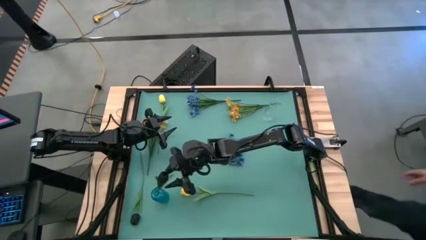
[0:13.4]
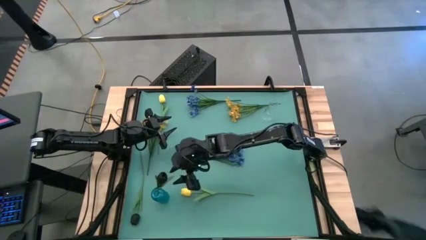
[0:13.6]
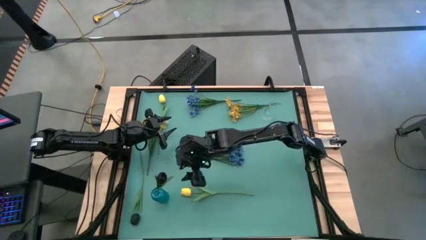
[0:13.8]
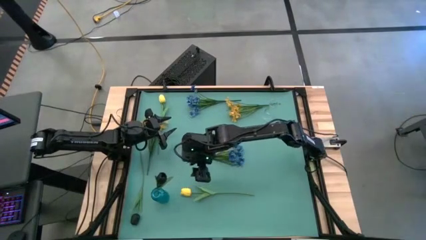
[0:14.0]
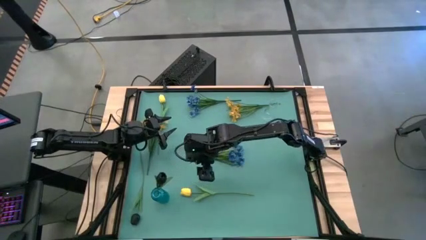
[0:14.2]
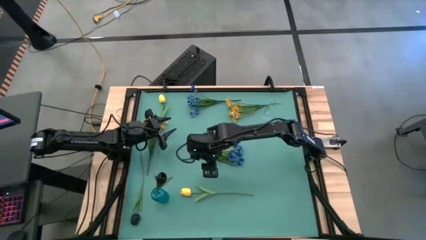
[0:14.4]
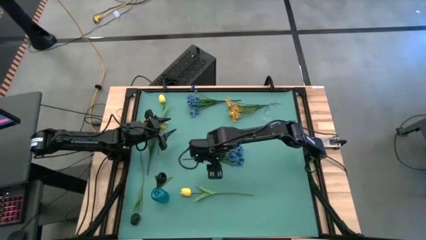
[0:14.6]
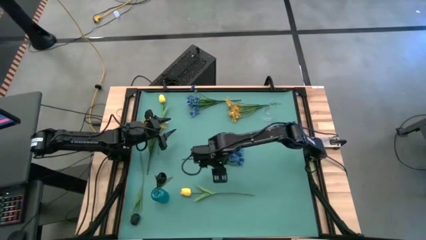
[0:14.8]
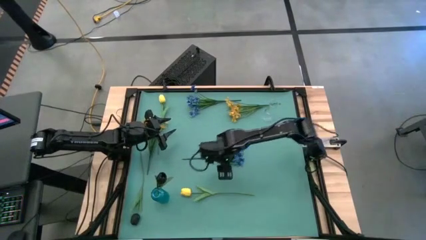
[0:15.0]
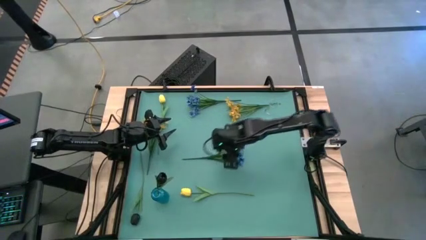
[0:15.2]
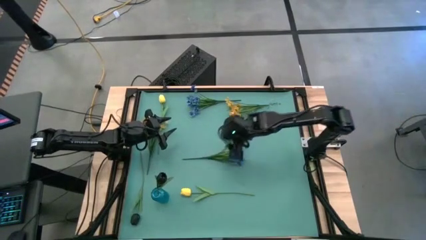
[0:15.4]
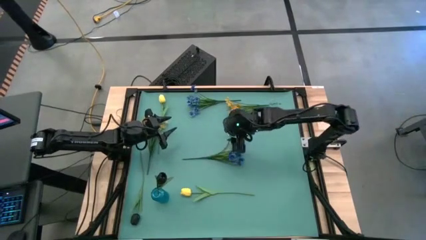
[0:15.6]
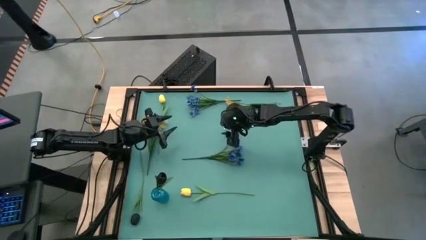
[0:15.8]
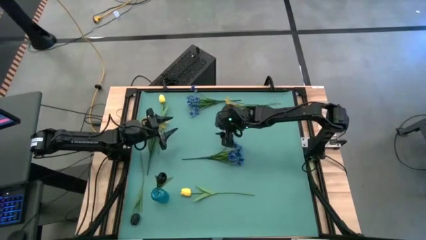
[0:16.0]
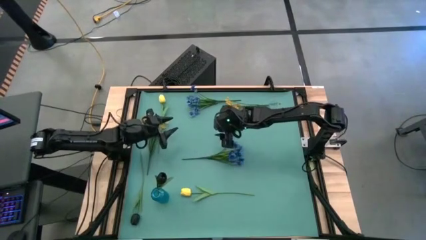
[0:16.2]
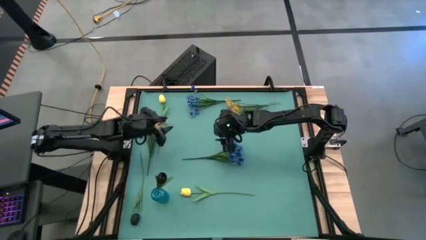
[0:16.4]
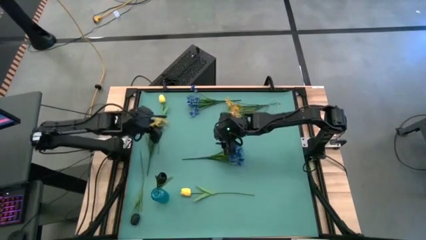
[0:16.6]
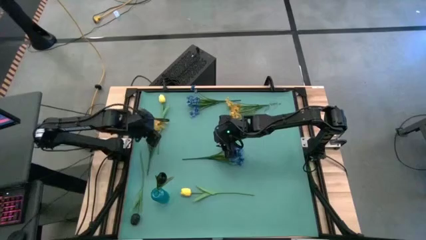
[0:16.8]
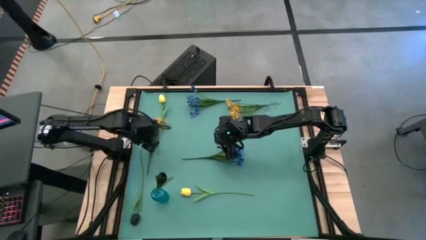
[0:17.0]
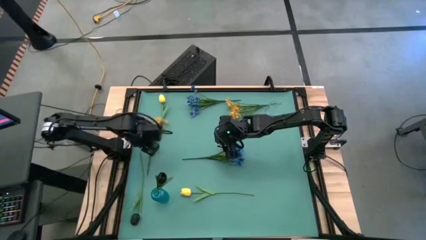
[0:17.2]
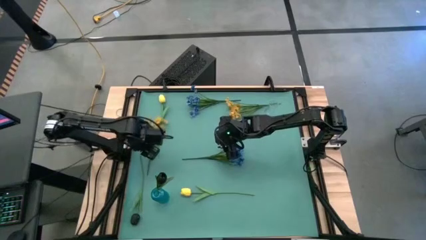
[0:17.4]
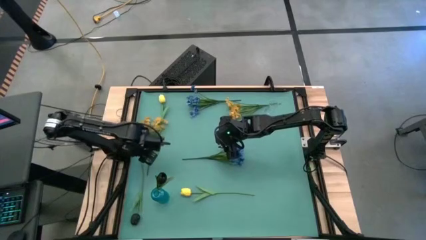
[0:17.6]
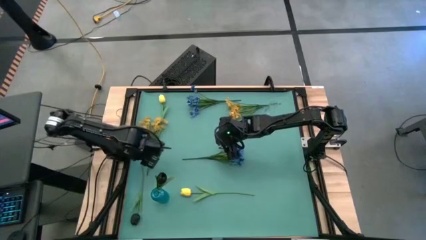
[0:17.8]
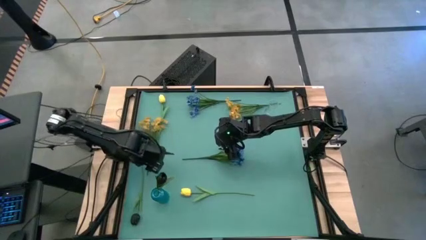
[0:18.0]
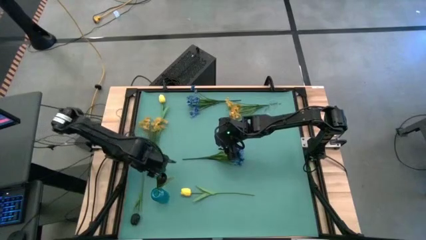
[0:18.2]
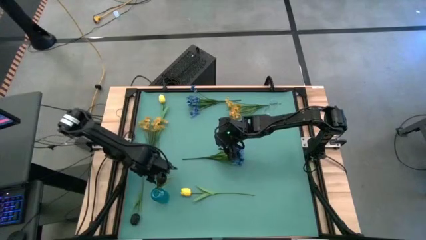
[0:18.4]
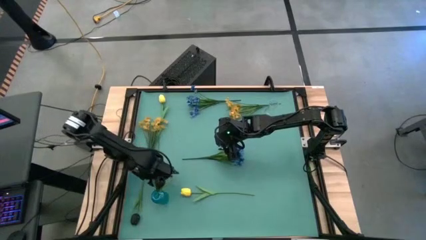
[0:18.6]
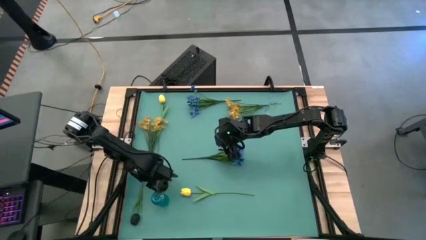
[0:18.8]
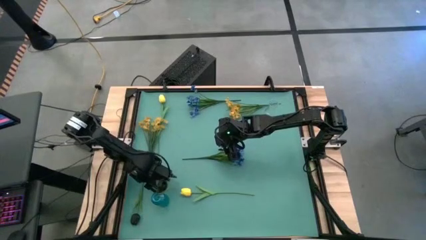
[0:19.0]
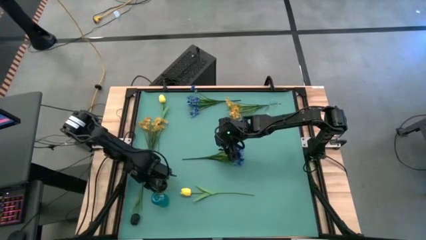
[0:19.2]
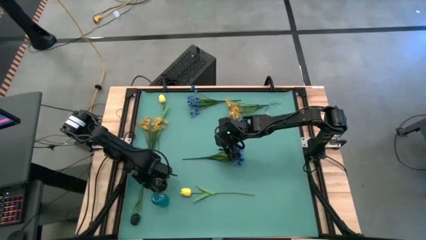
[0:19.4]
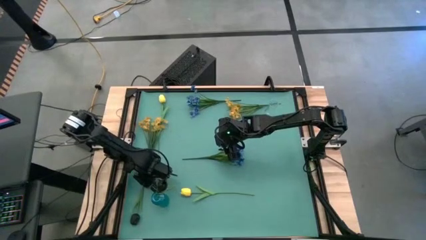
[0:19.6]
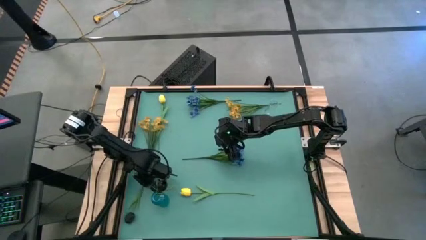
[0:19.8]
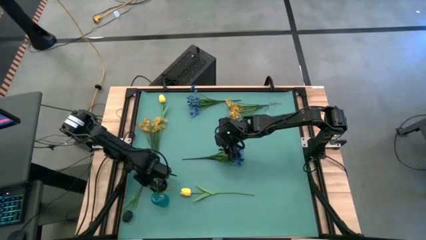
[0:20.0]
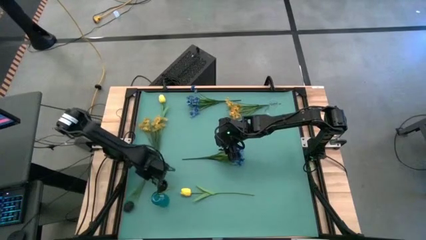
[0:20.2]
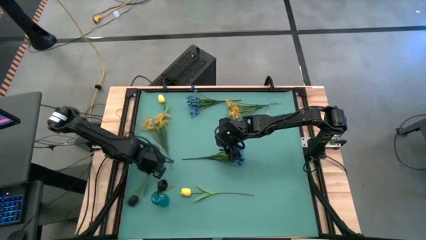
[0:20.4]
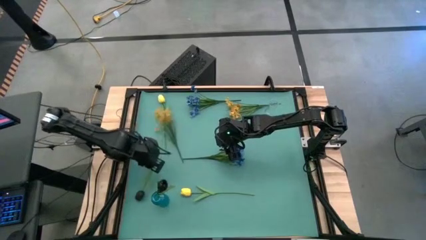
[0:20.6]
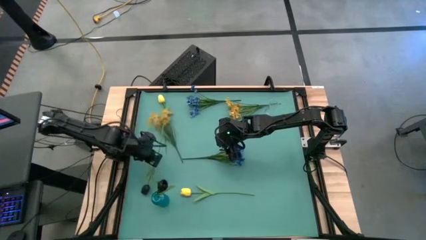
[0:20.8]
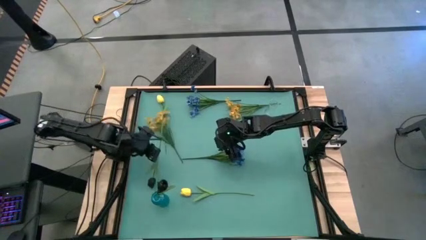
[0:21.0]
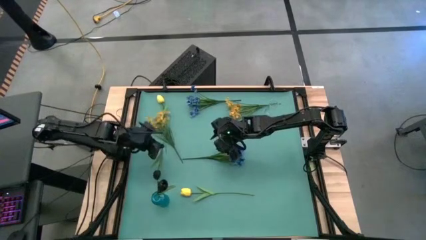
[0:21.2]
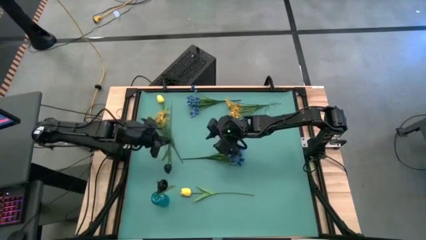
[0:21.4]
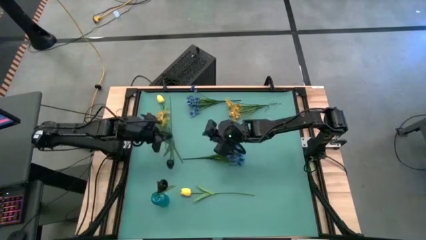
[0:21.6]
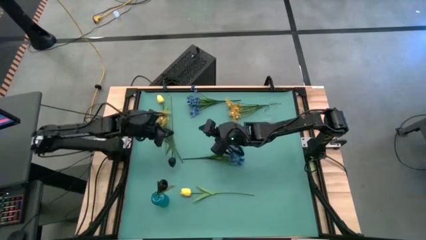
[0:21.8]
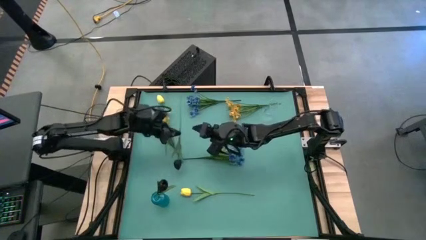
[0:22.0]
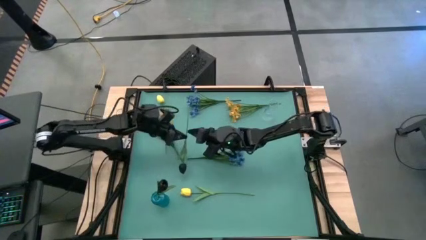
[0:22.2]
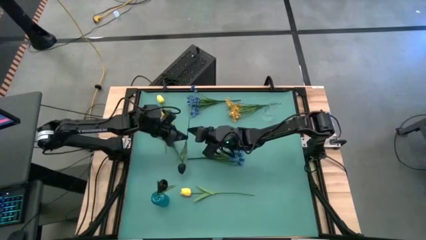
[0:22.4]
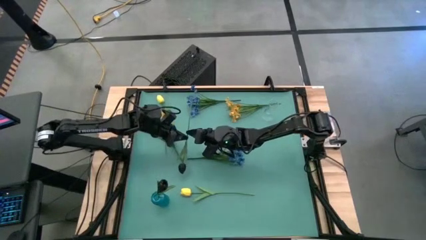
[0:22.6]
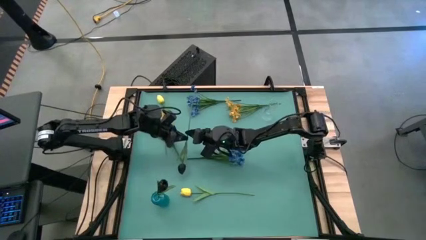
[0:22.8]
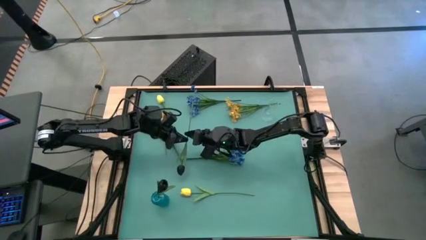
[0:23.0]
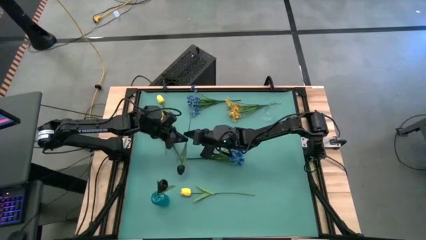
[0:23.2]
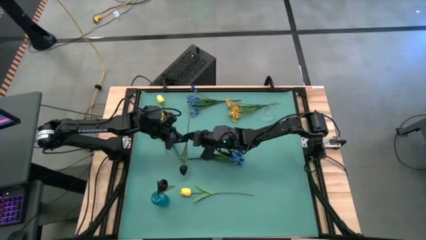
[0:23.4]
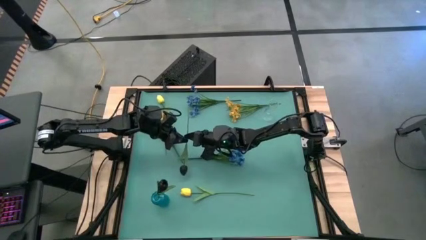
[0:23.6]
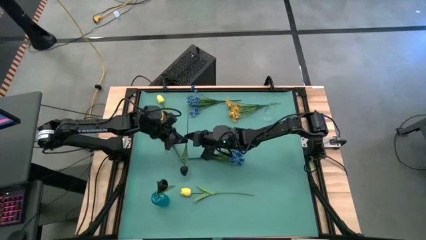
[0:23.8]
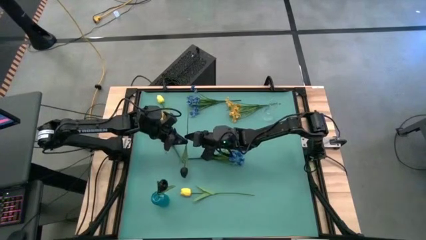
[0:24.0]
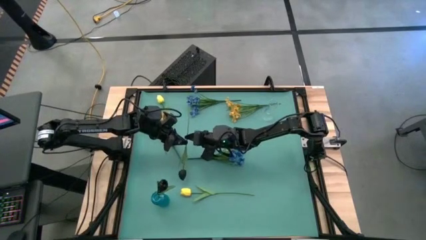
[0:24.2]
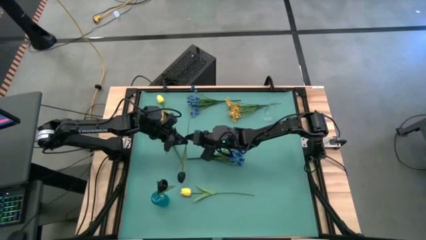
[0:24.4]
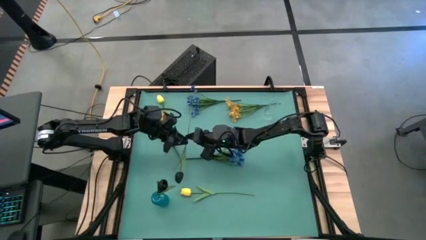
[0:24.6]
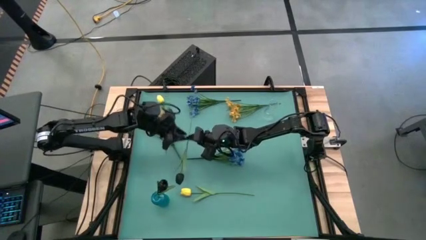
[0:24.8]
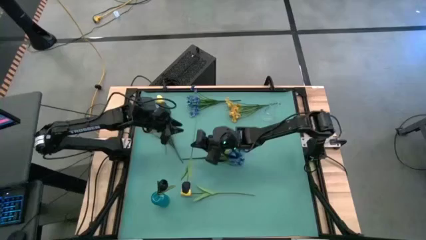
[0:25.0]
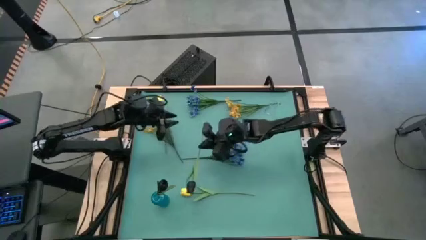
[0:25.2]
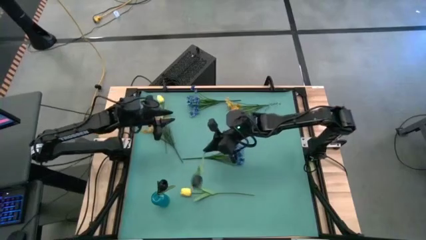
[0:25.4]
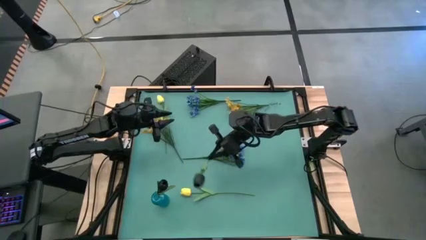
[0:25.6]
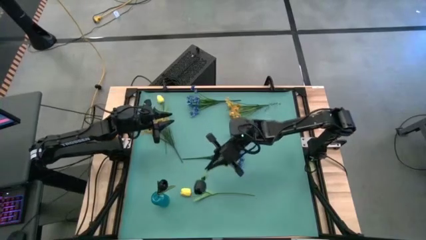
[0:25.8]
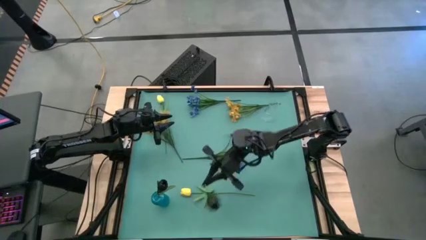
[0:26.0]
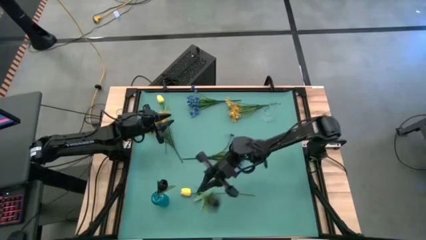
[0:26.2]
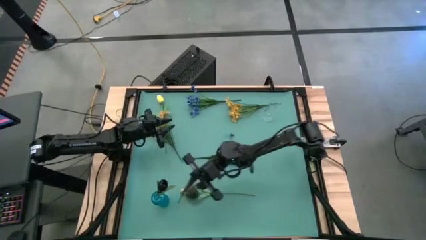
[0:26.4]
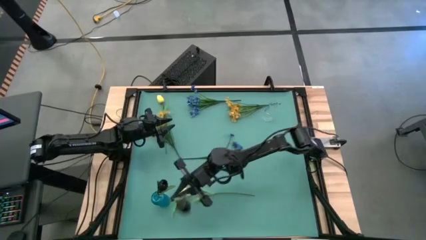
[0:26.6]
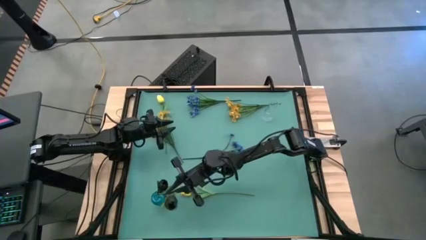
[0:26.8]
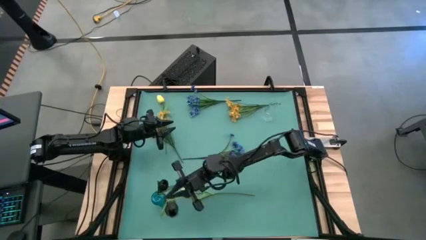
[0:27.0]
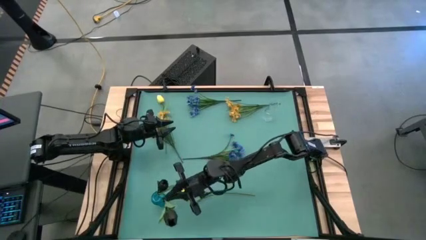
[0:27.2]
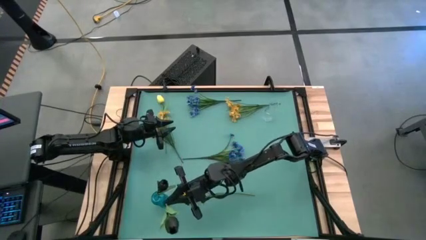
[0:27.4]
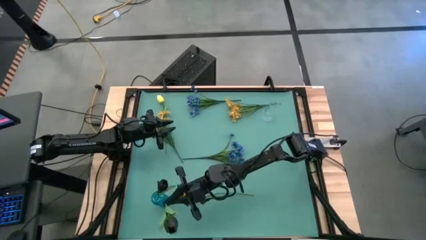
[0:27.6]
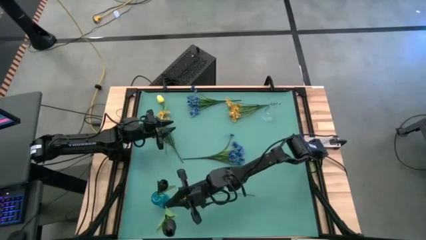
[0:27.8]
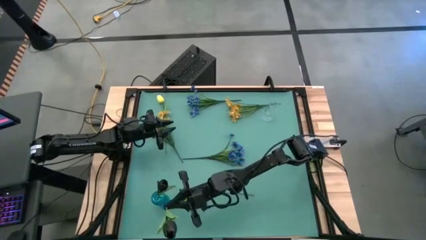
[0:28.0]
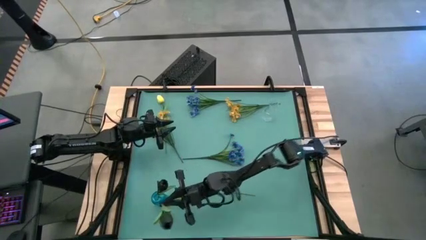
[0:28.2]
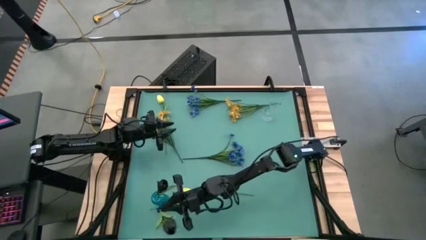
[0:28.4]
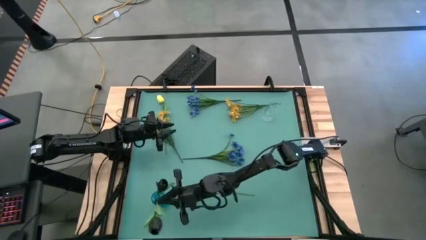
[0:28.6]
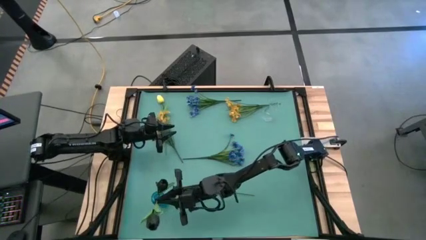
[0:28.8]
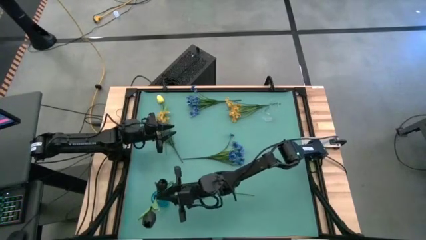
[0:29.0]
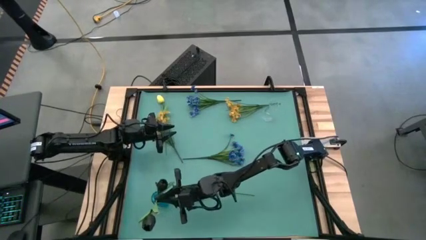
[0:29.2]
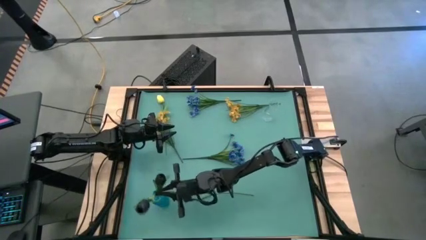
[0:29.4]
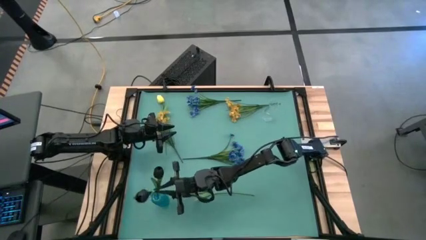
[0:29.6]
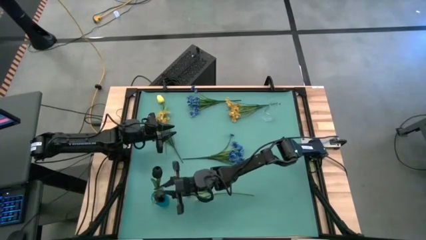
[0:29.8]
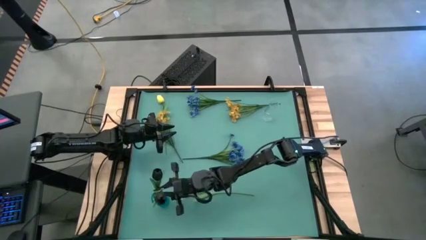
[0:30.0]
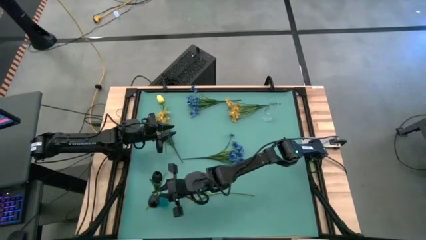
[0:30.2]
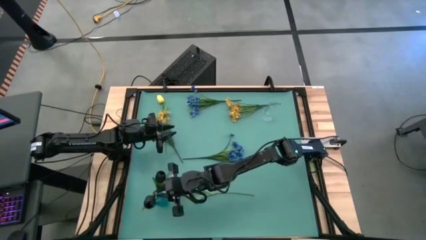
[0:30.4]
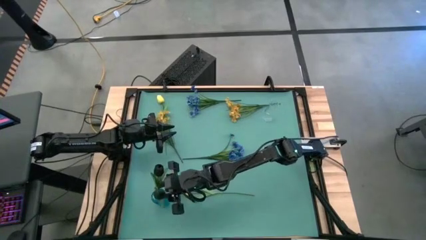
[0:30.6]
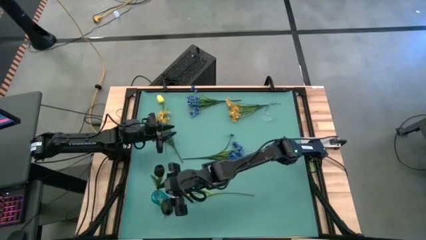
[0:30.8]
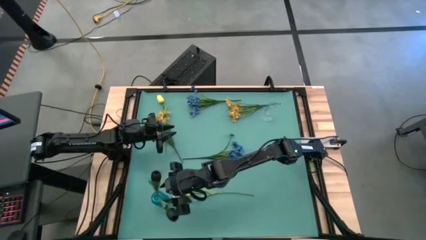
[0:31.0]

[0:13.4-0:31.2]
Task: Sort flowers into vase by color
Put the black flower into the blue flower vase
